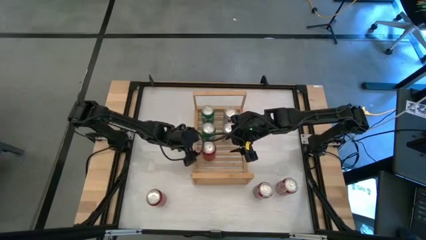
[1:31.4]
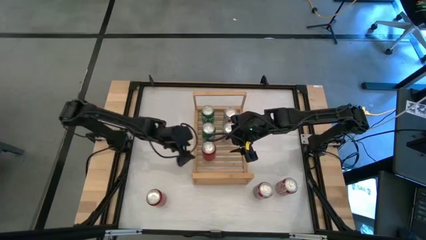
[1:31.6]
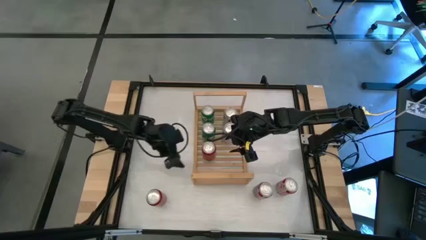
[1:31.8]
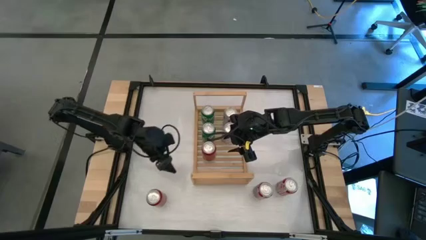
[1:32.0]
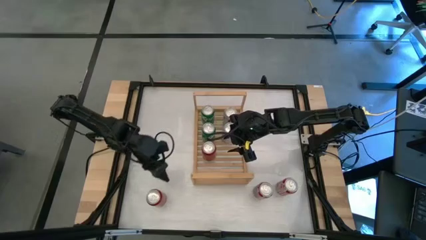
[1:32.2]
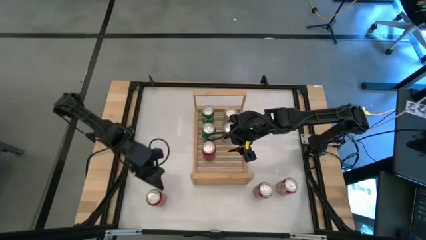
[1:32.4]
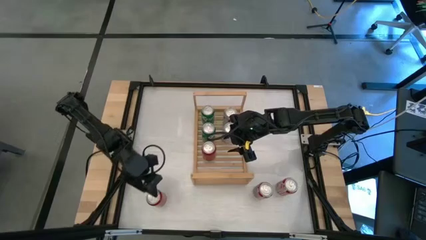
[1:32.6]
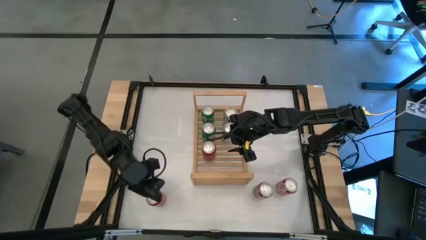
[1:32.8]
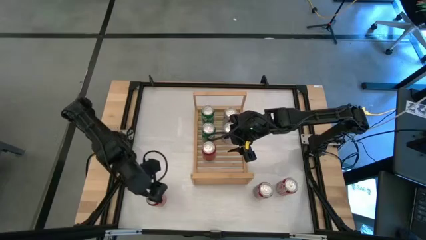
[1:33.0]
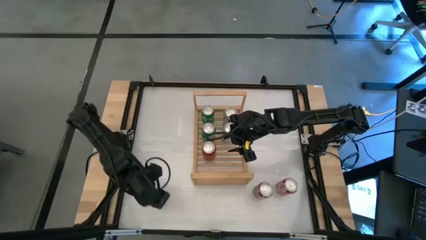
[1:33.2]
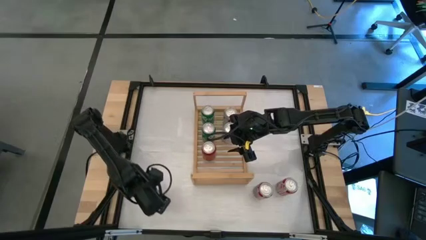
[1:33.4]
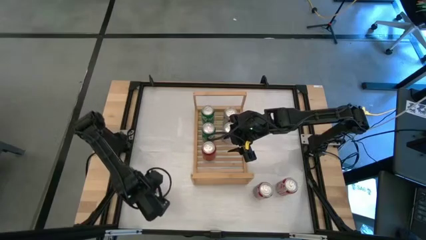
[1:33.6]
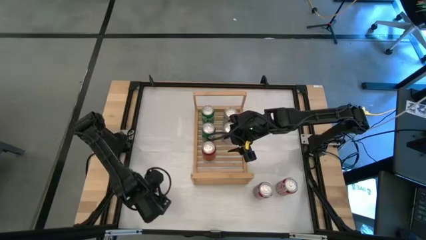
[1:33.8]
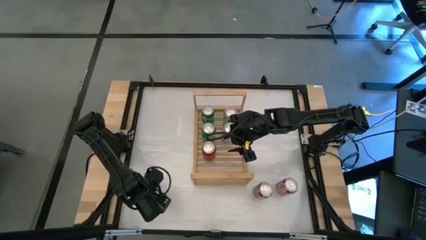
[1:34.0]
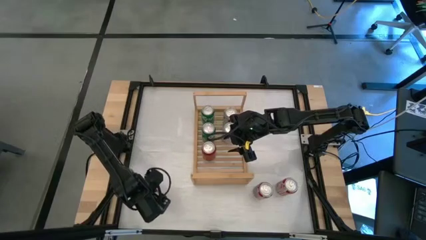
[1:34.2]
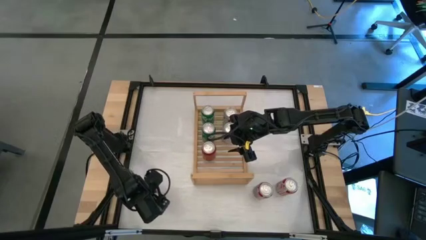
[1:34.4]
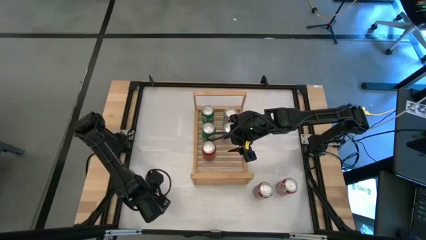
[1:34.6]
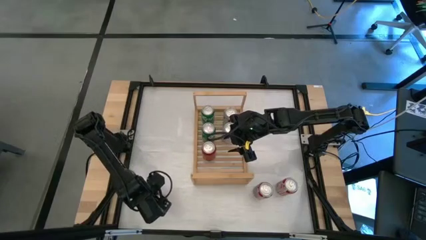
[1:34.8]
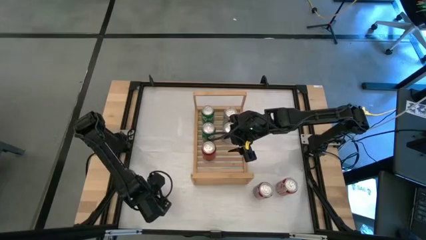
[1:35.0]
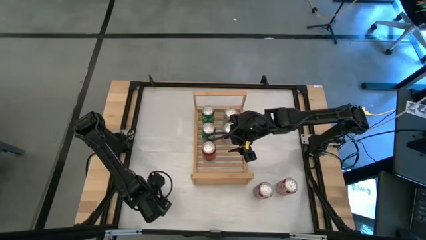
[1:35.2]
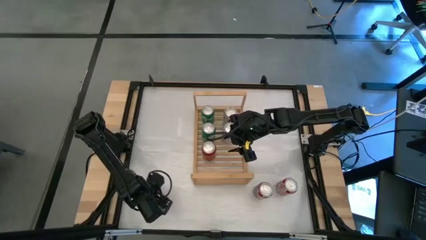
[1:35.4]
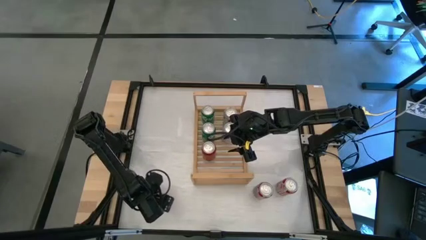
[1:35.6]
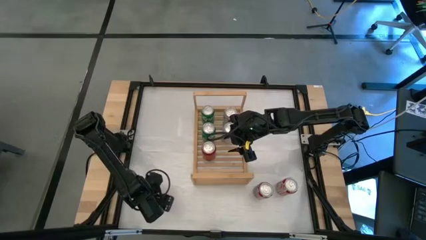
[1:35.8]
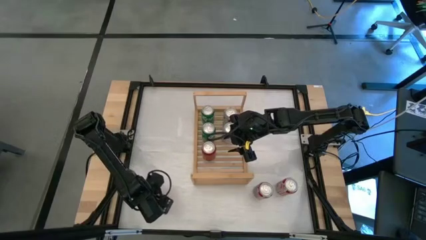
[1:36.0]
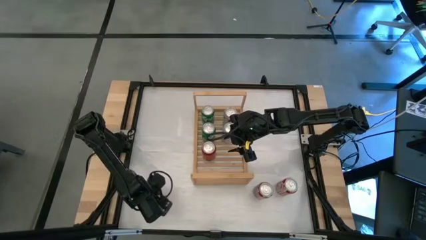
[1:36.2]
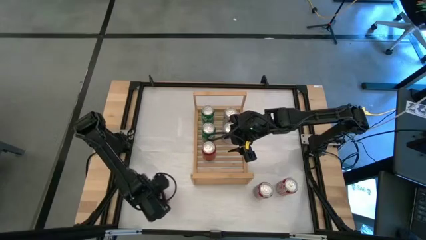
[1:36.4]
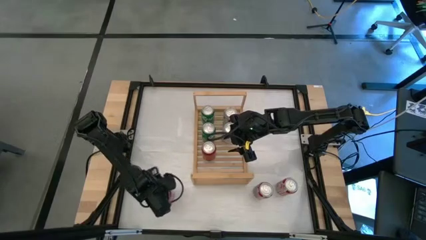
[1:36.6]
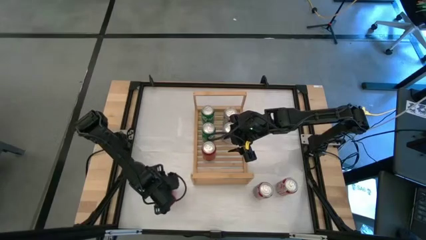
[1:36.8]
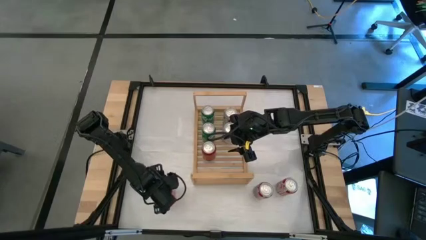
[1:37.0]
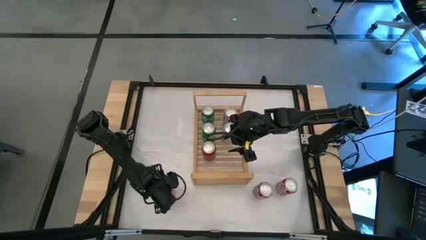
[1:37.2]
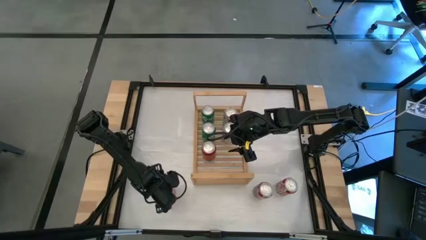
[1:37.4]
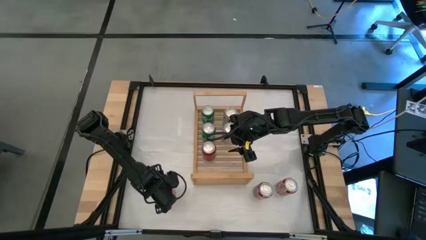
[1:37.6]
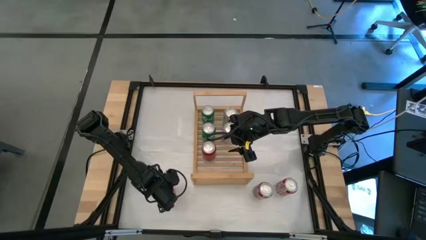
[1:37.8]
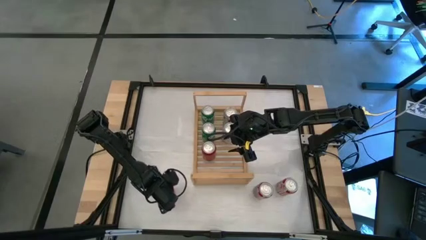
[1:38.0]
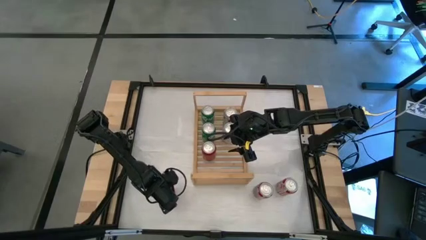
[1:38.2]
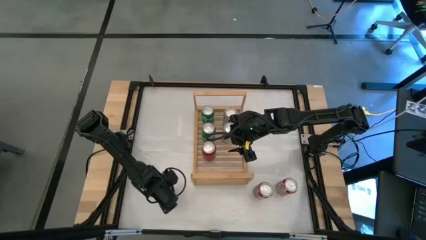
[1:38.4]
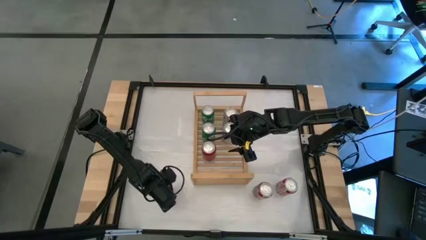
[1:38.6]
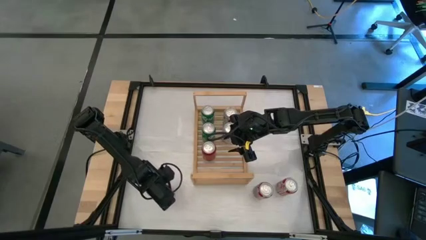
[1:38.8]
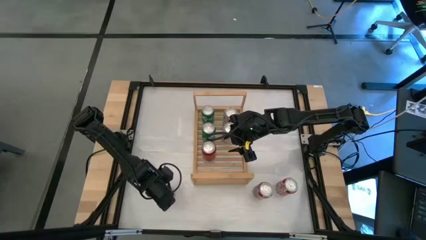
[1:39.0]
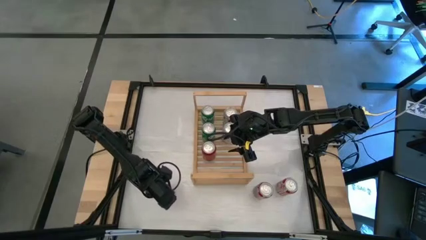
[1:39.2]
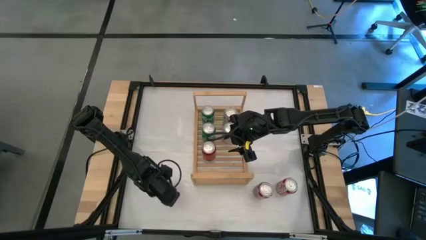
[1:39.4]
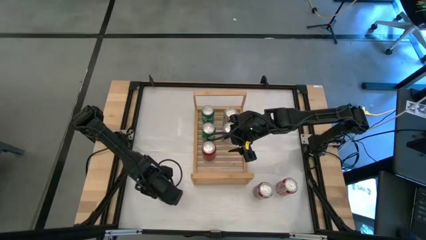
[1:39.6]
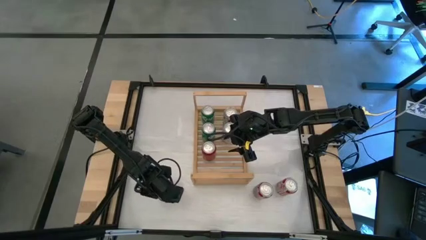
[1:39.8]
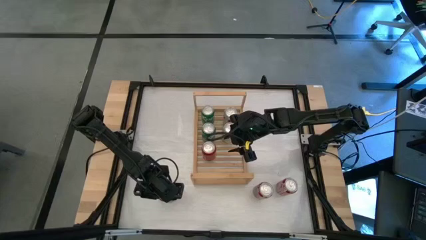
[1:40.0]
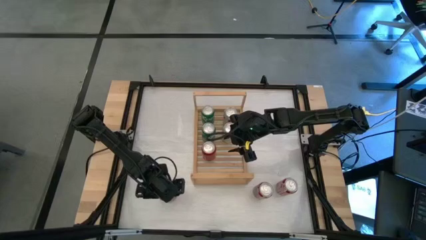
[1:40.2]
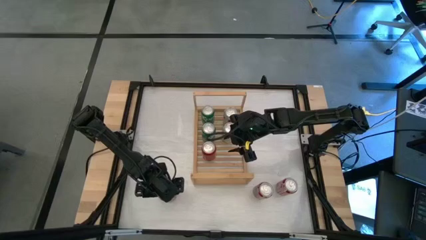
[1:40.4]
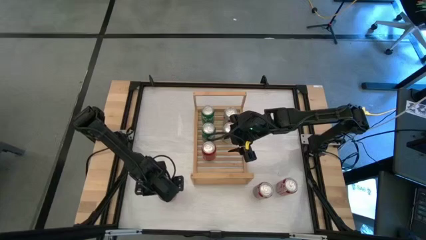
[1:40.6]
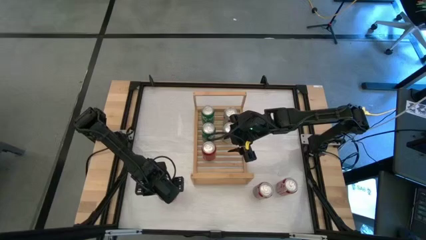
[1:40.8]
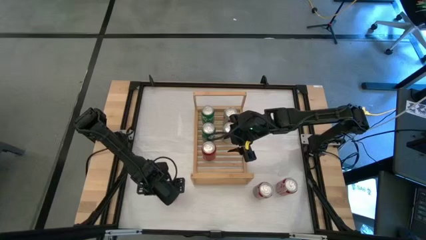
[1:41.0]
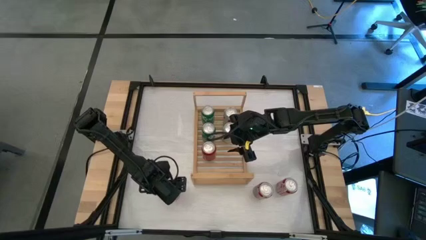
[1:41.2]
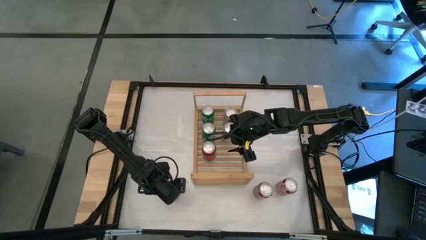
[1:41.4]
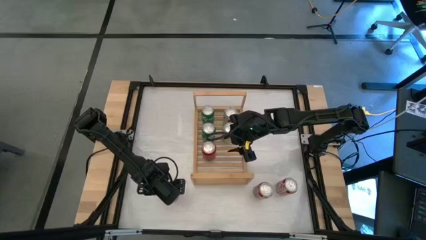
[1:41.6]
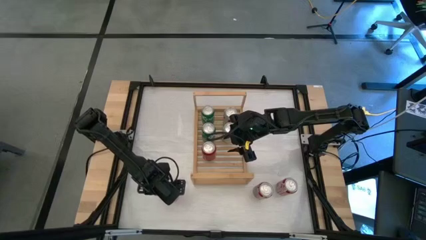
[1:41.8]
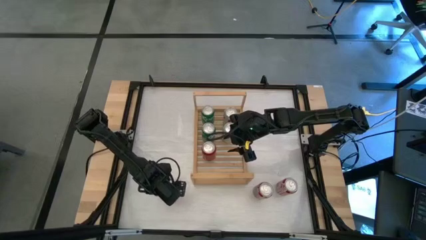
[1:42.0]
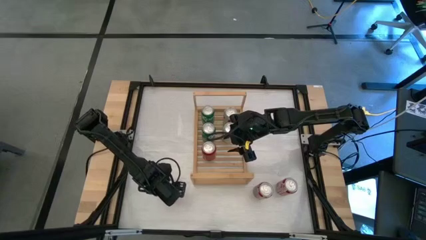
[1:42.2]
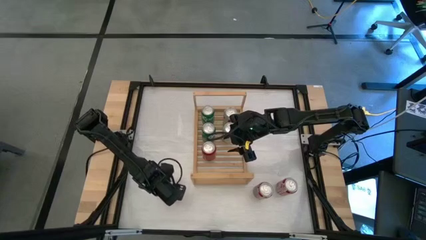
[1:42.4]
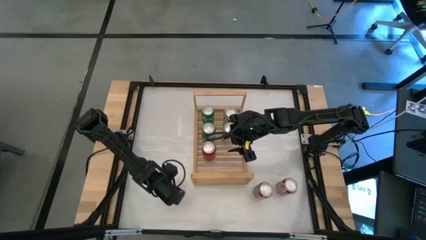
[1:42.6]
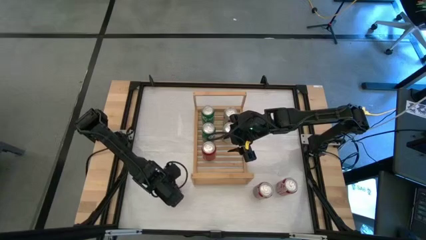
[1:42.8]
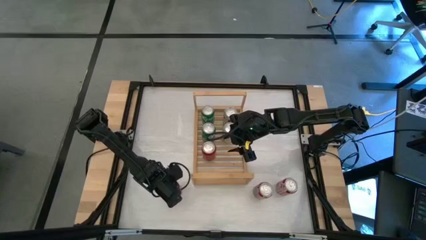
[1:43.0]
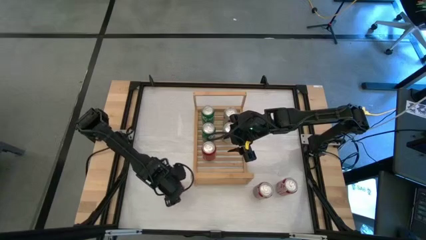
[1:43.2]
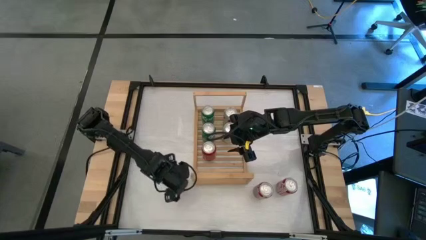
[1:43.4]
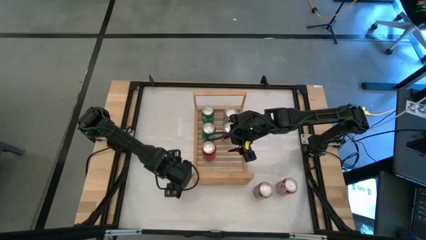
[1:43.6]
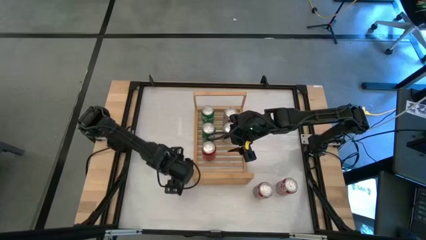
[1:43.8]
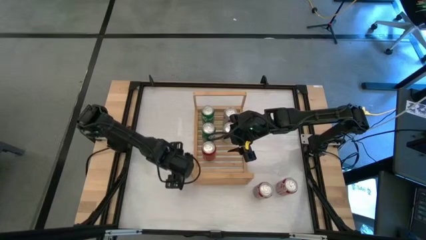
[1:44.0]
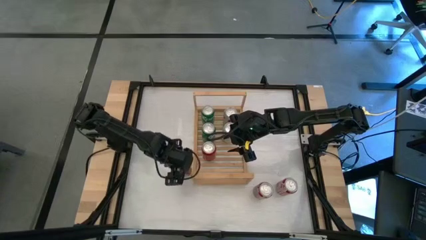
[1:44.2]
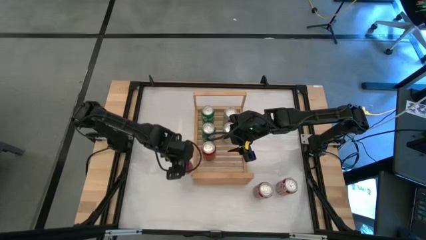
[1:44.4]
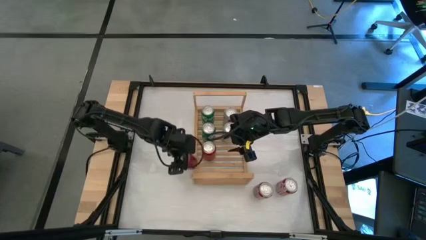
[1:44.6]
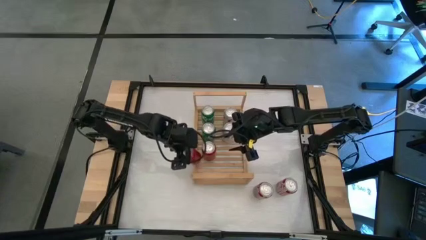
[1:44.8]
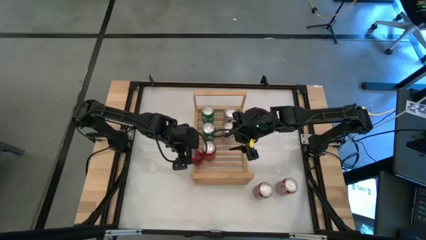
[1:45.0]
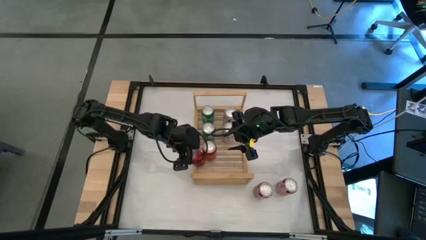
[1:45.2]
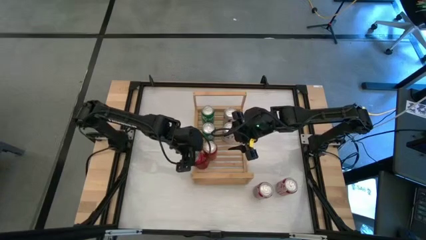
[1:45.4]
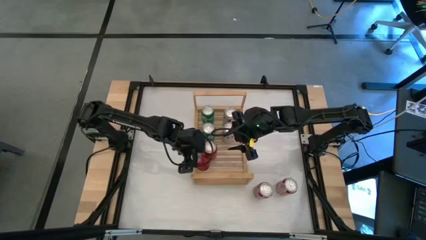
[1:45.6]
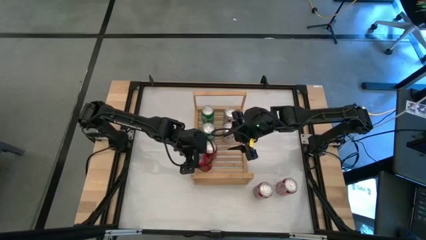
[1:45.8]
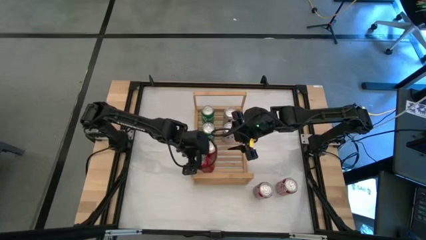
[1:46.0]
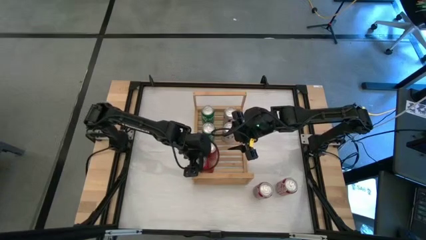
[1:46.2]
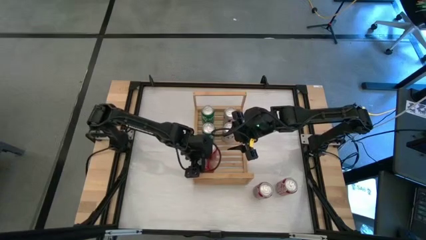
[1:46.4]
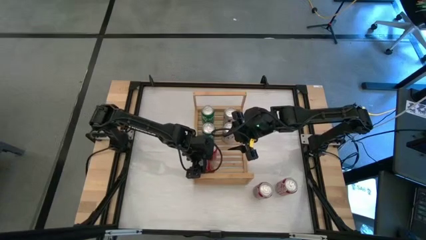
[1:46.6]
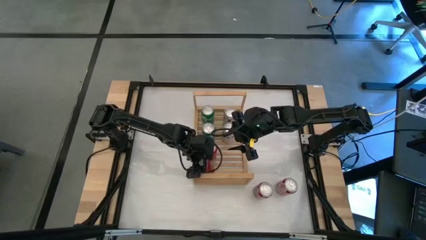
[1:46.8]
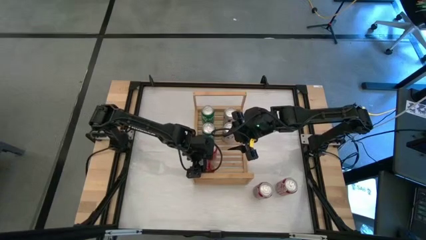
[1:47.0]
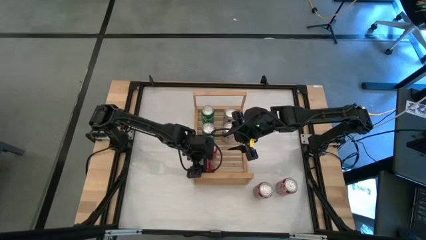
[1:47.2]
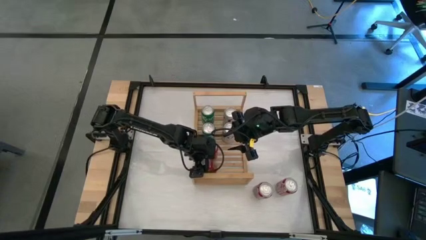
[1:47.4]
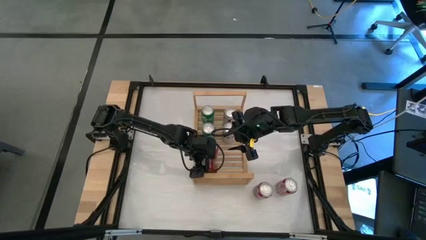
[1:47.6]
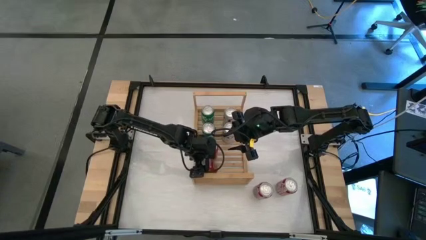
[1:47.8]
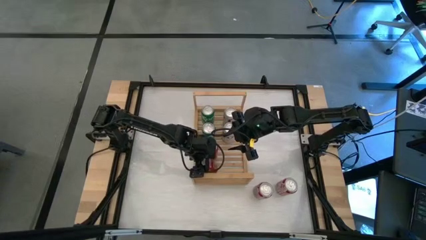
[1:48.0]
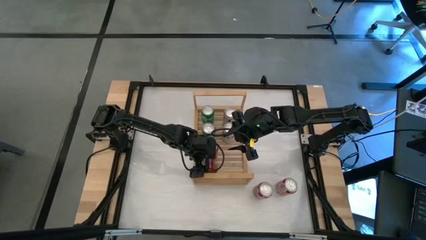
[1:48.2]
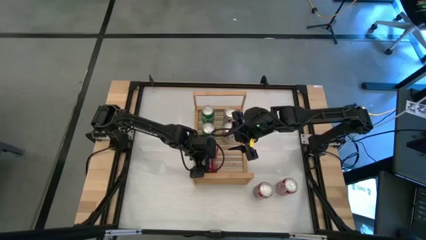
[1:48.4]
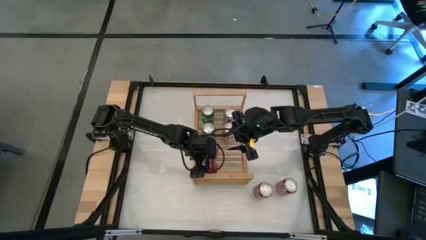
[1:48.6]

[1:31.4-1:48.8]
Task: Place canned beverage on shelf
Put the left red soda can on the shelf
